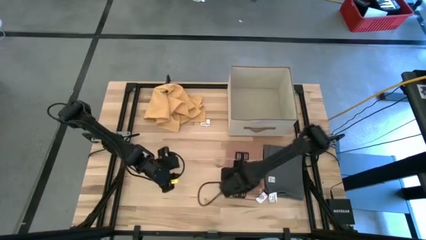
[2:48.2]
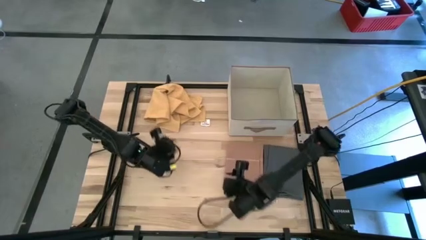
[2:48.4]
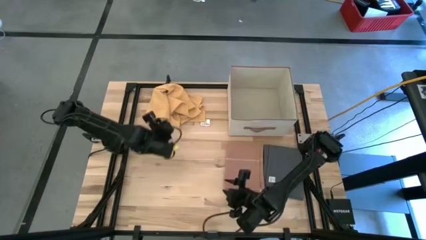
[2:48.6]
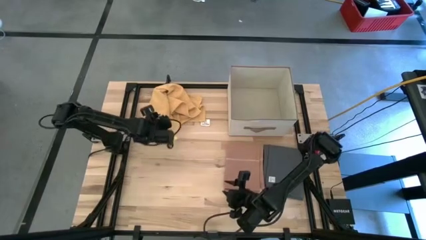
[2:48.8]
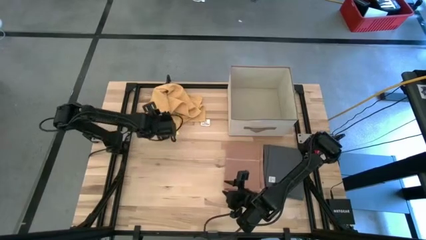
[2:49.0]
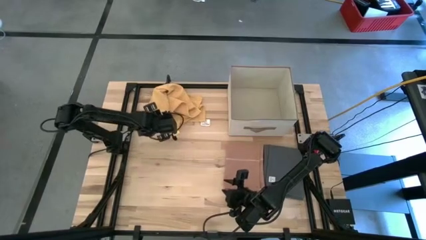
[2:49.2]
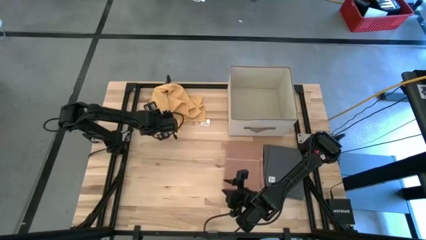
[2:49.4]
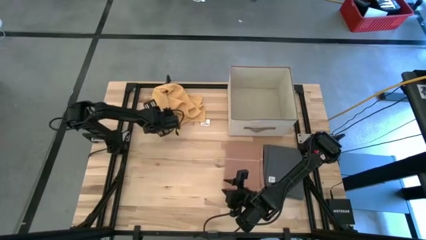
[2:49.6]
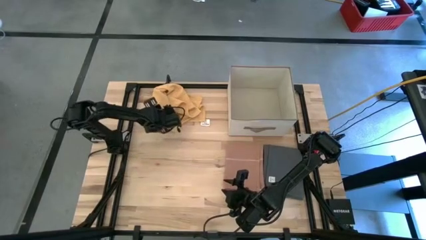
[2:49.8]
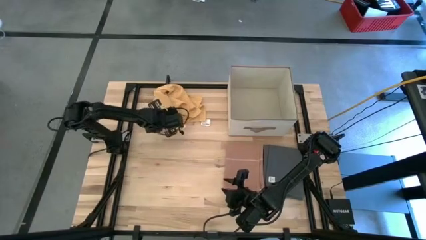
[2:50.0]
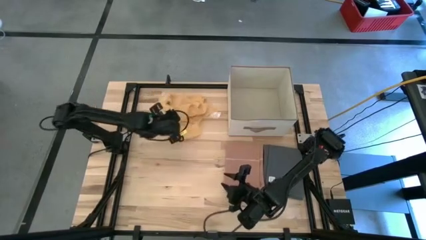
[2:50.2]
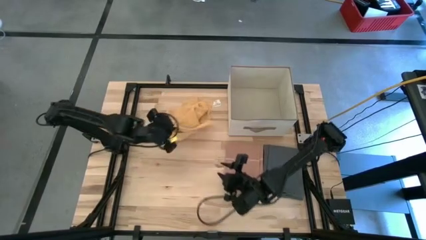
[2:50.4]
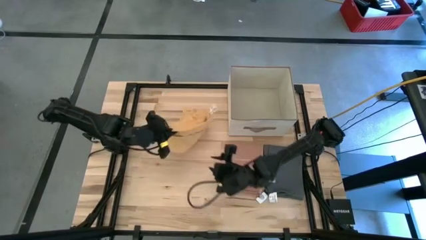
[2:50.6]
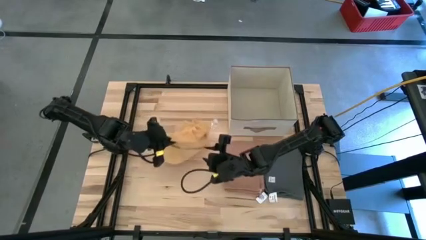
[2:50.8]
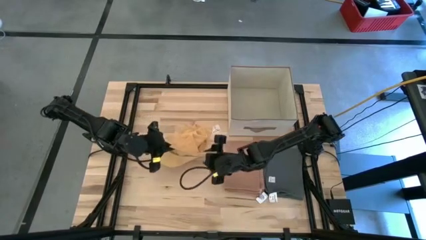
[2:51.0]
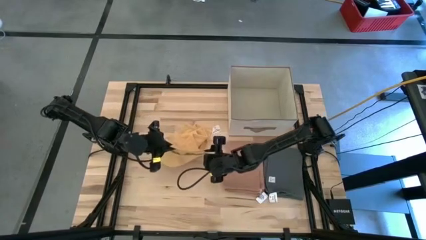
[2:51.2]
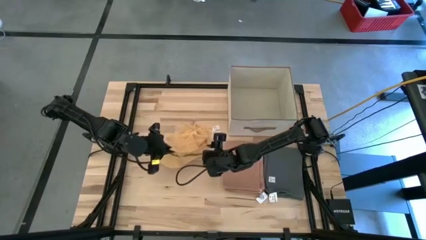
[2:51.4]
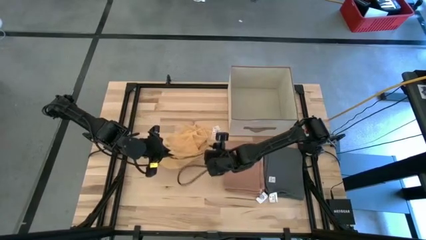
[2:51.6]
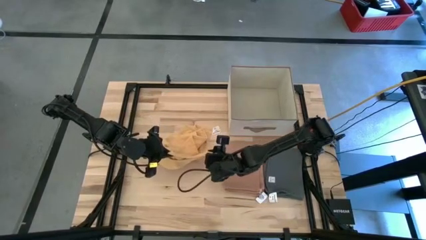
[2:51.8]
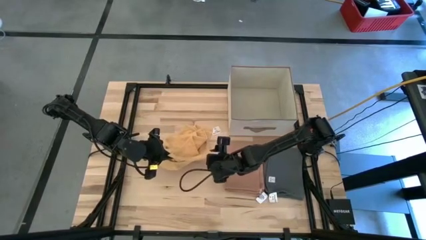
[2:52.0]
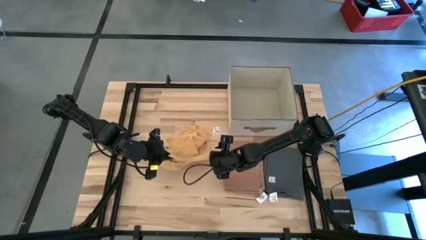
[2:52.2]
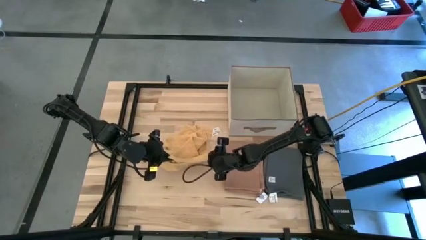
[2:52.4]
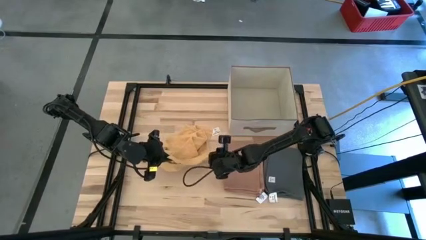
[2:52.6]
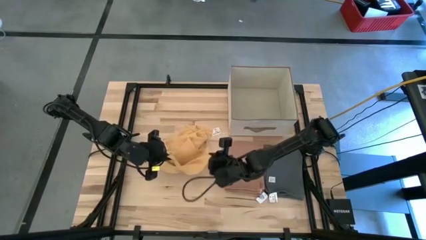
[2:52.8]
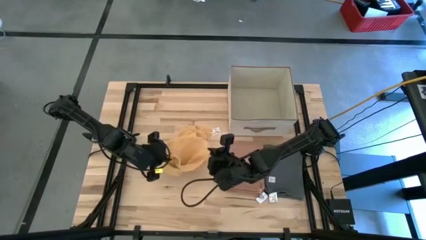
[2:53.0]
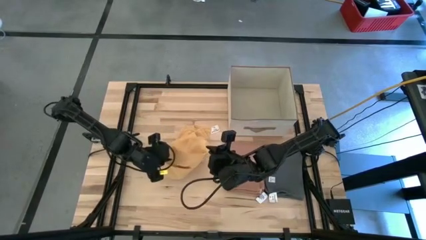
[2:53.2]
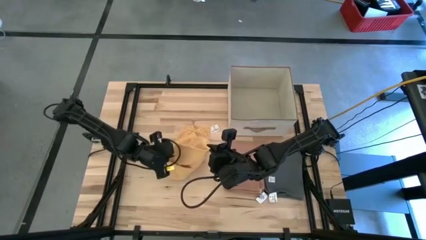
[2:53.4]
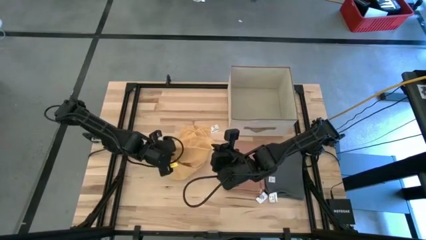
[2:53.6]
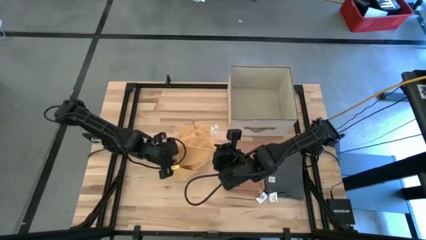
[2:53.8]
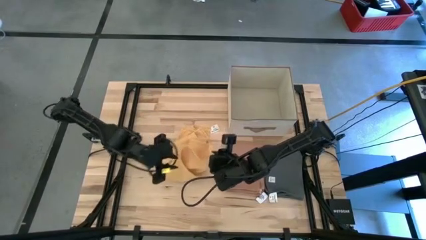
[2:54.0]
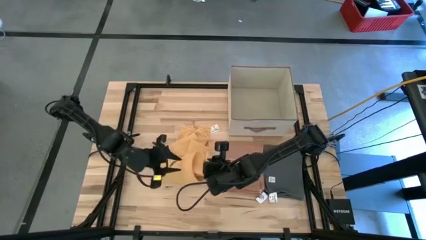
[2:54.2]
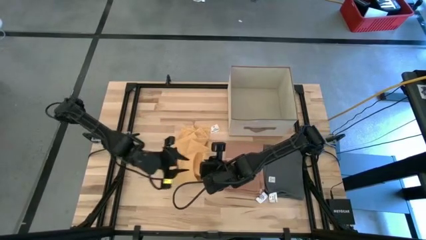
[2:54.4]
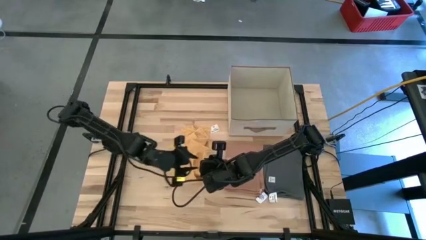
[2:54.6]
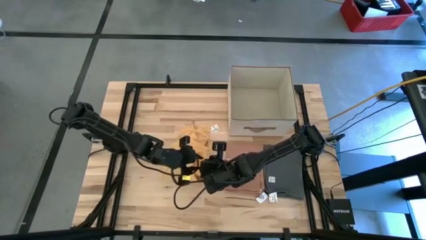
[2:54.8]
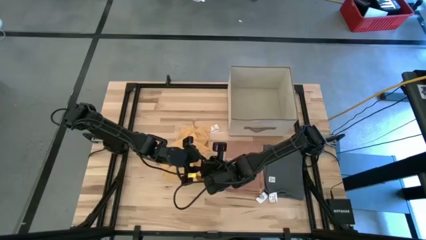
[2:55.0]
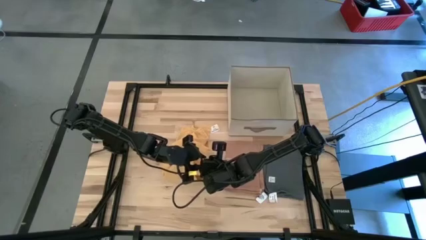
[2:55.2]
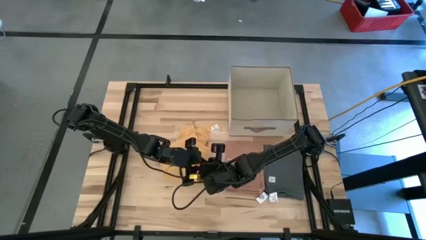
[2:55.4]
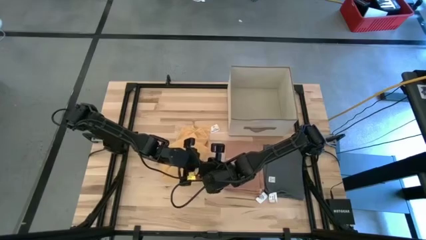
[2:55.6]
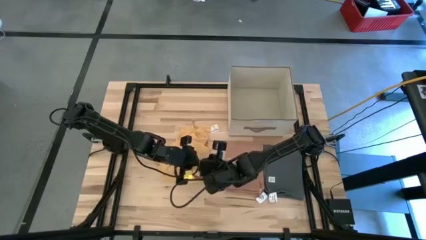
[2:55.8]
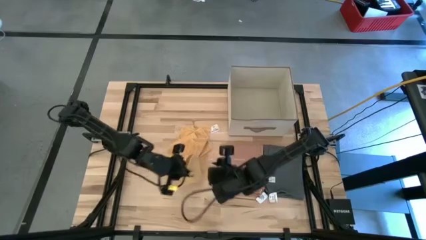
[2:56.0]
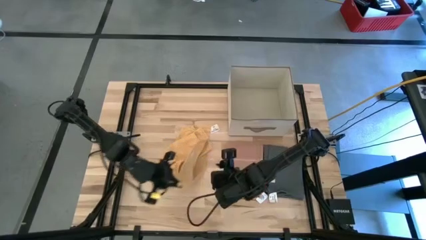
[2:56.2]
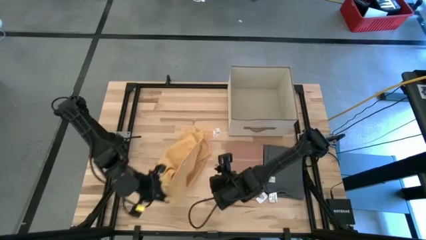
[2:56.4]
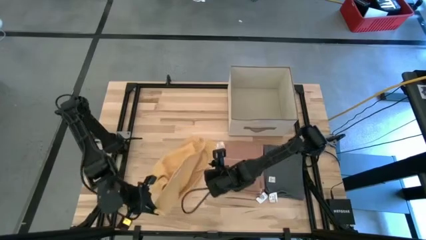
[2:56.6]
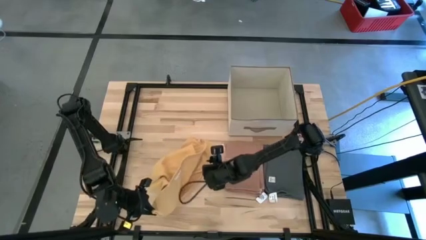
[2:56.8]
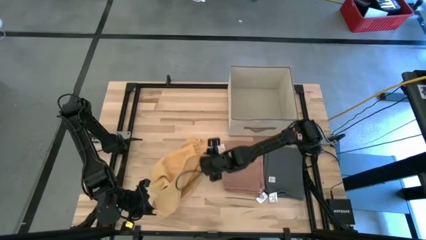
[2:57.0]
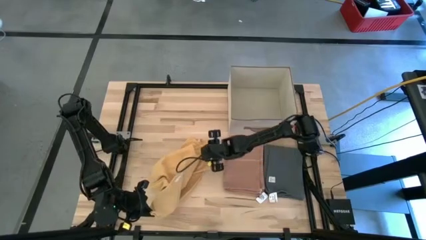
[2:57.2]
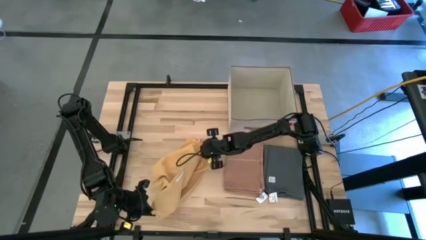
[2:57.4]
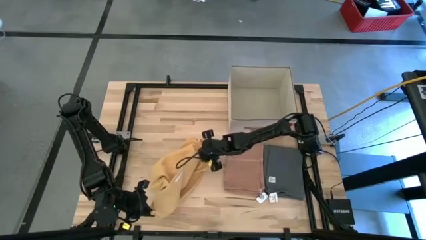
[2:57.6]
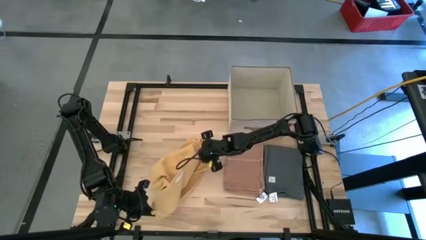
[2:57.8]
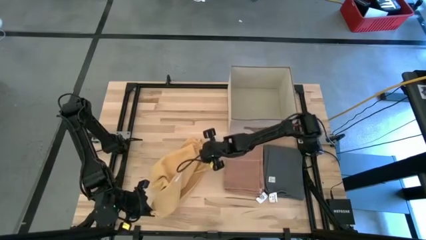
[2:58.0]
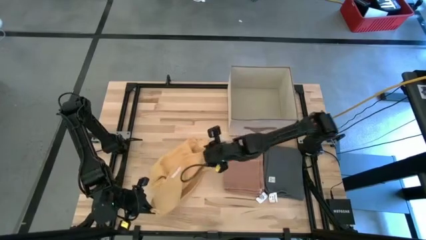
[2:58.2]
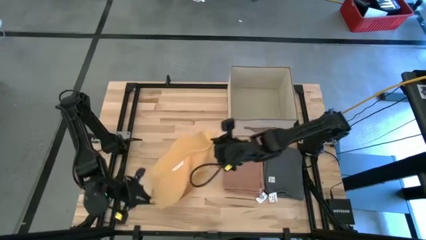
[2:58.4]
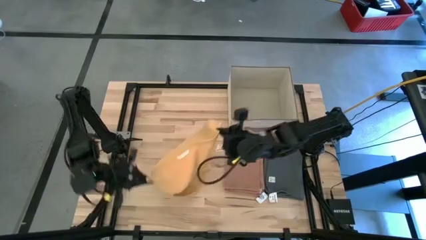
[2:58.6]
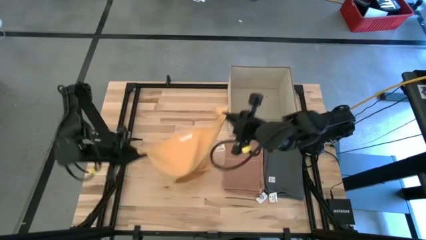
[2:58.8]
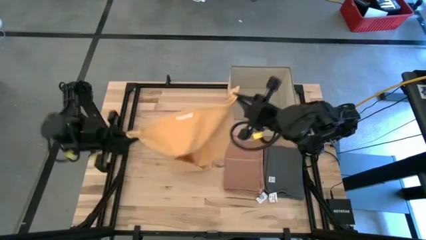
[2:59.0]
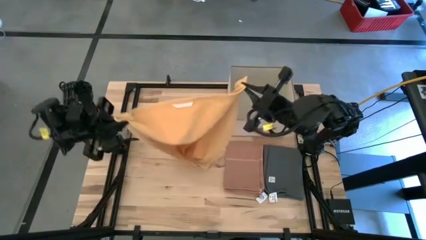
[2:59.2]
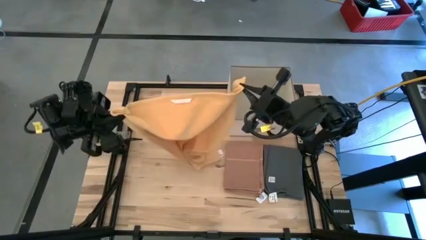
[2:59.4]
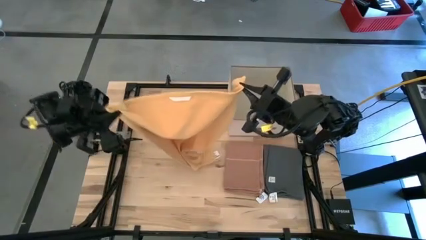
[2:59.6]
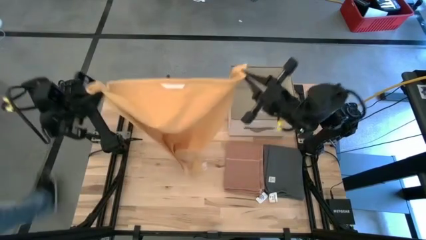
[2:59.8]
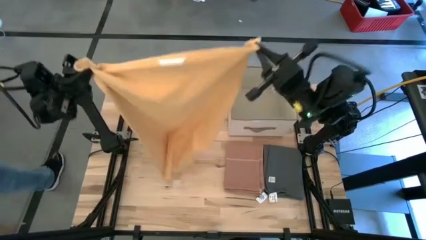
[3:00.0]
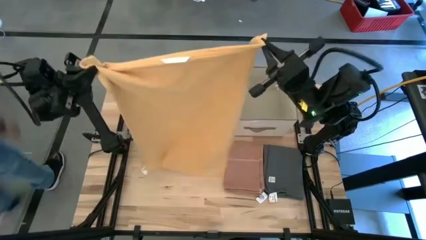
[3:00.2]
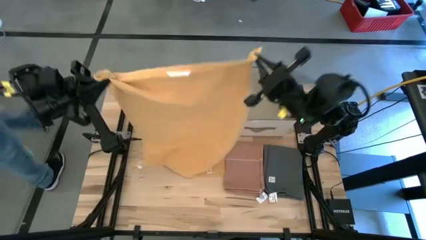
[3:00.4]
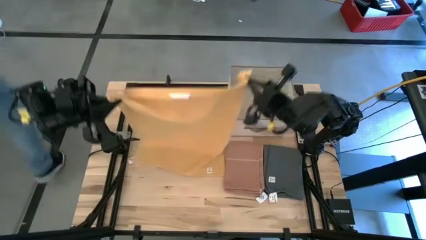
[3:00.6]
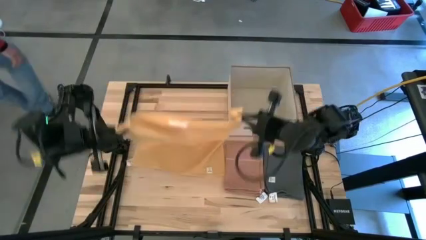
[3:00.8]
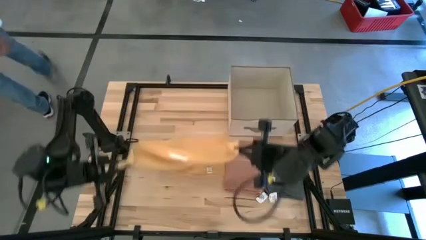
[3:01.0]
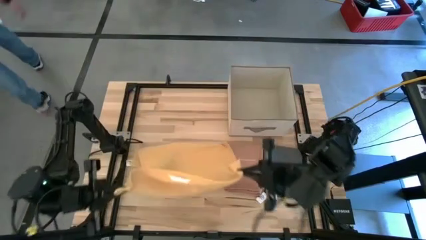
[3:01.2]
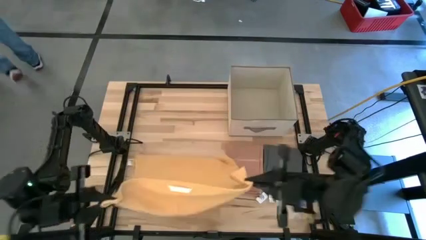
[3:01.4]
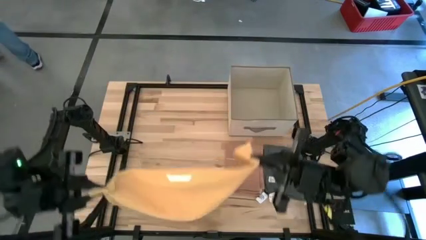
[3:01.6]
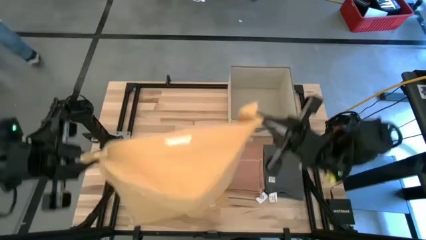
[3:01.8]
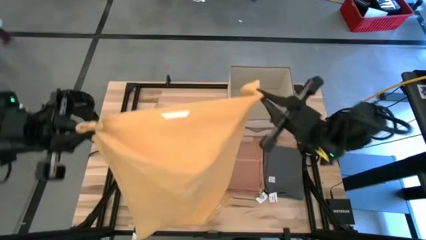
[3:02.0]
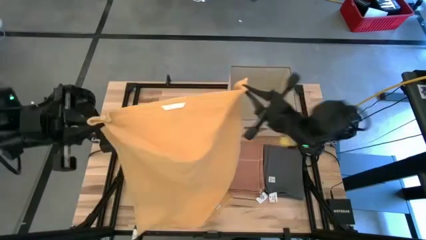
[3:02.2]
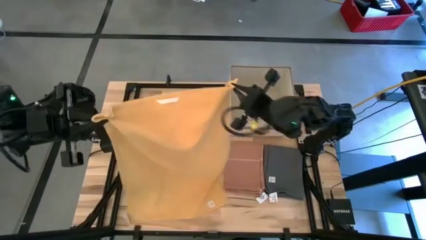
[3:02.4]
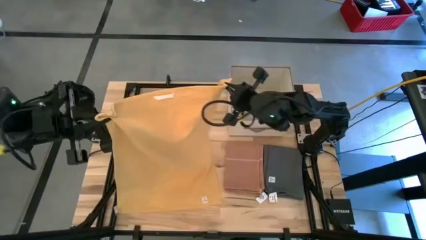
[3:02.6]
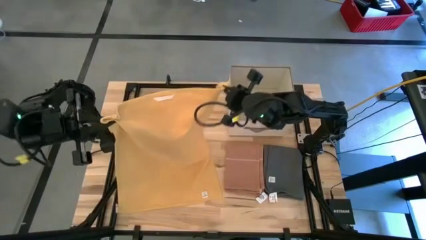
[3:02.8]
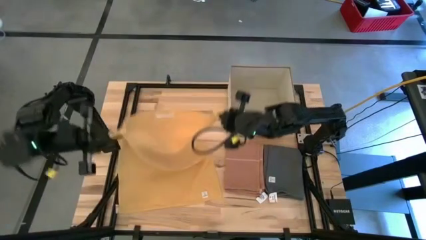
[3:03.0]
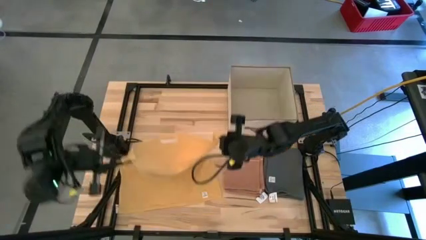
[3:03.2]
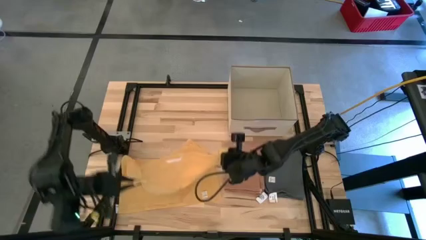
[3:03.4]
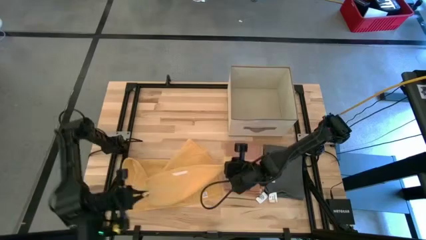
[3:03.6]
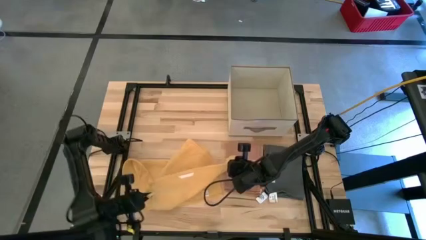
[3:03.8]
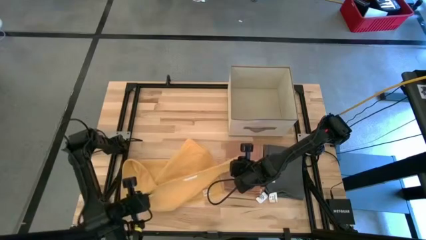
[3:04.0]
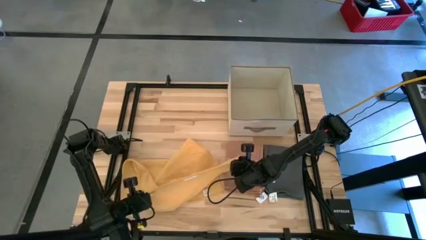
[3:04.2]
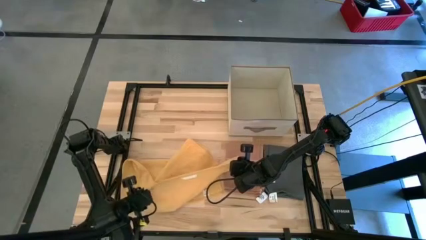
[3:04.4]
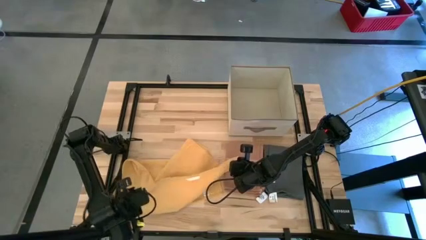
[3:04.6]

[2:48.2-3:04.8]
Task: Fold towel
Fold the yellow towel
